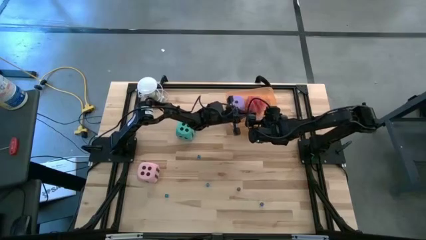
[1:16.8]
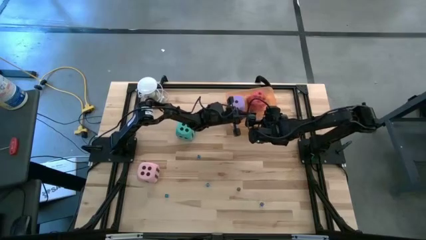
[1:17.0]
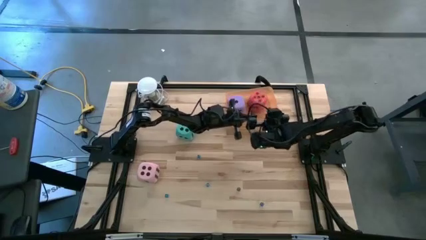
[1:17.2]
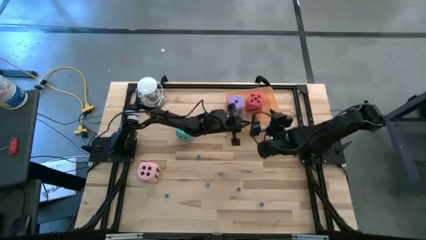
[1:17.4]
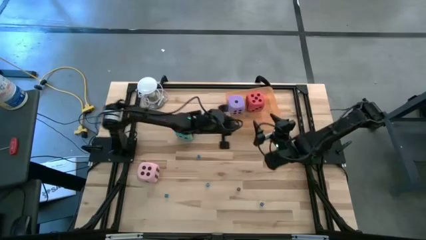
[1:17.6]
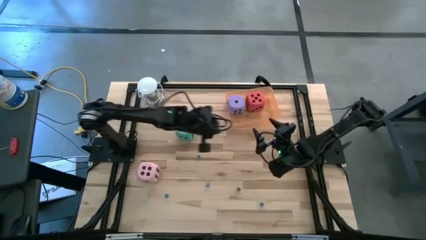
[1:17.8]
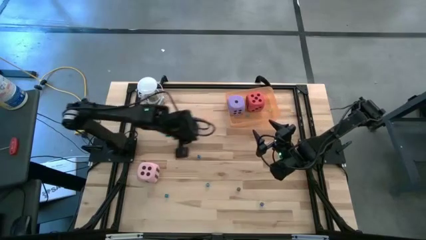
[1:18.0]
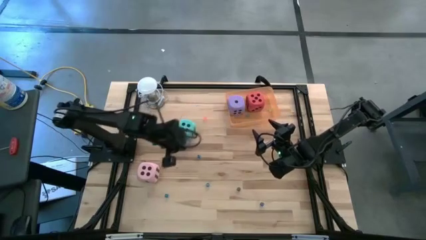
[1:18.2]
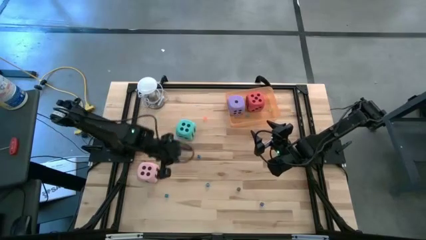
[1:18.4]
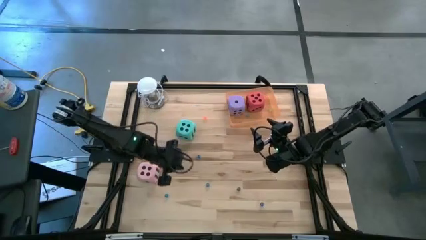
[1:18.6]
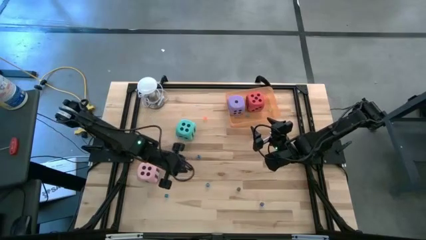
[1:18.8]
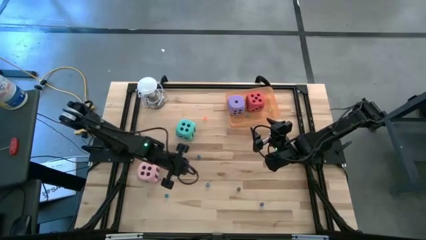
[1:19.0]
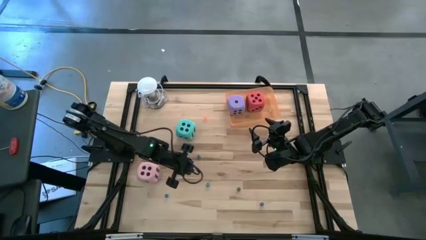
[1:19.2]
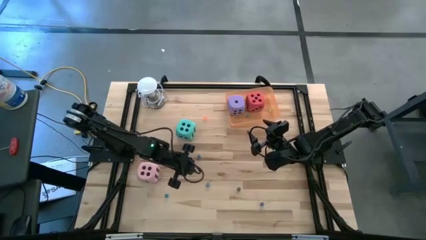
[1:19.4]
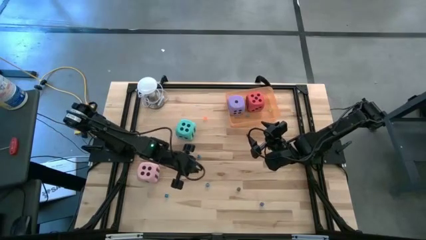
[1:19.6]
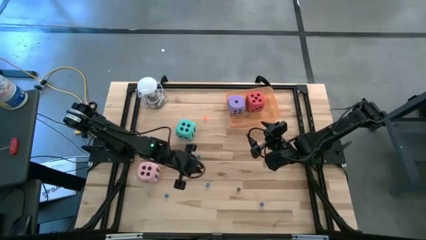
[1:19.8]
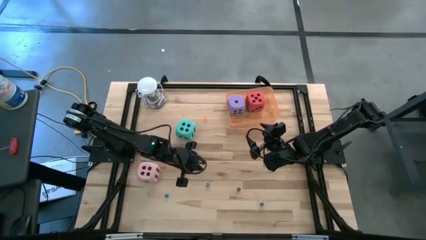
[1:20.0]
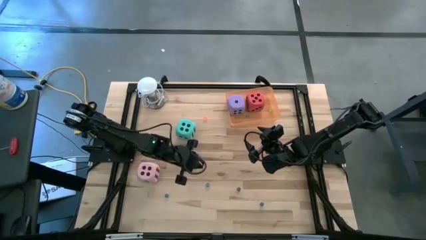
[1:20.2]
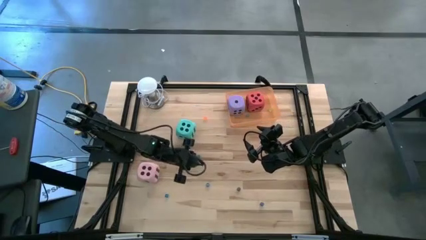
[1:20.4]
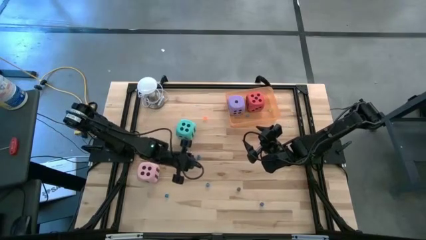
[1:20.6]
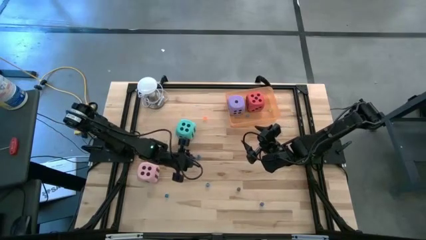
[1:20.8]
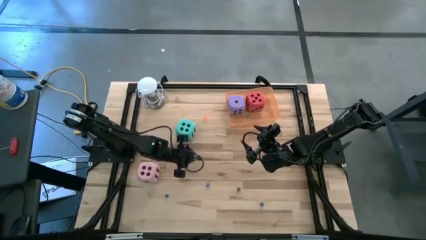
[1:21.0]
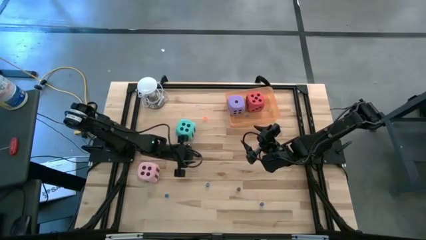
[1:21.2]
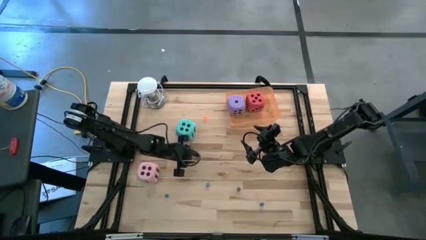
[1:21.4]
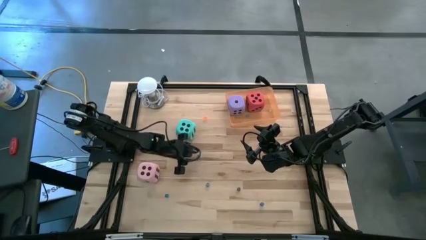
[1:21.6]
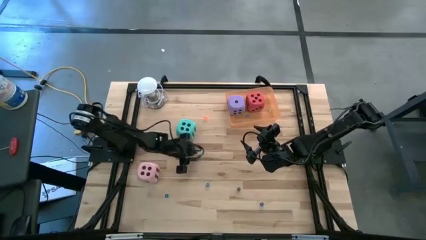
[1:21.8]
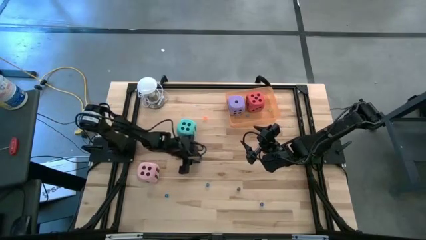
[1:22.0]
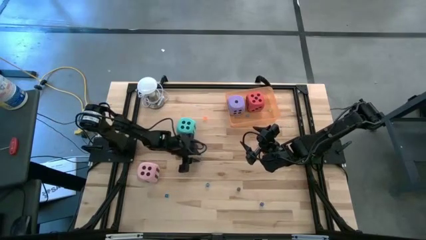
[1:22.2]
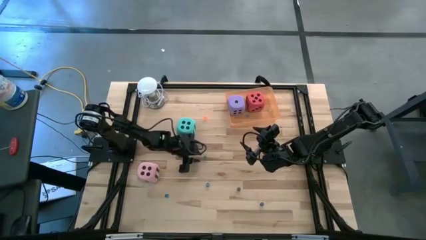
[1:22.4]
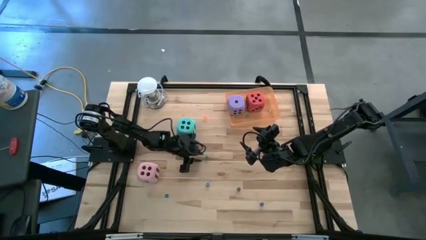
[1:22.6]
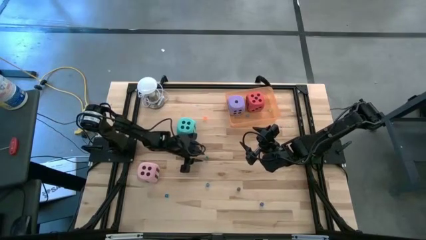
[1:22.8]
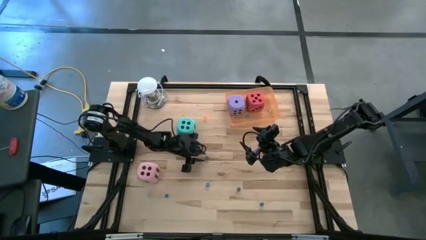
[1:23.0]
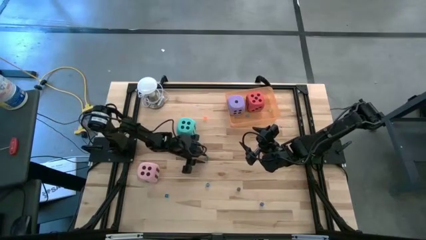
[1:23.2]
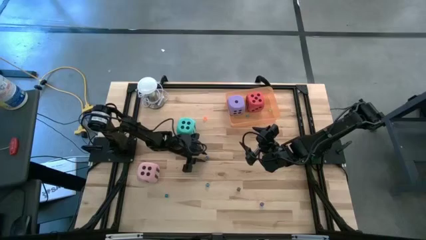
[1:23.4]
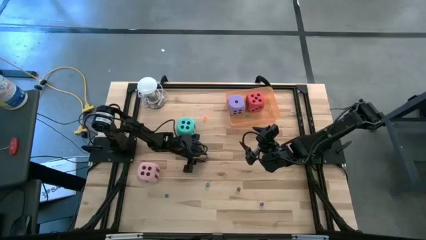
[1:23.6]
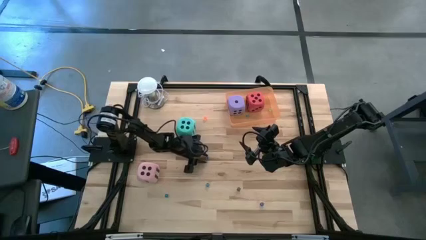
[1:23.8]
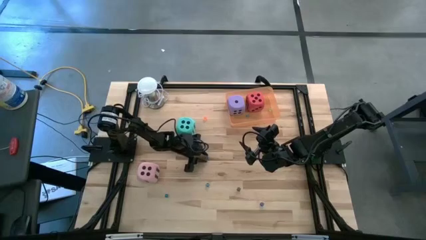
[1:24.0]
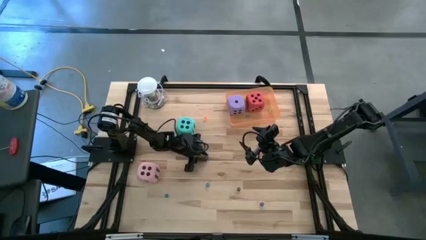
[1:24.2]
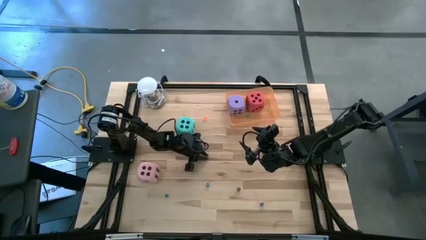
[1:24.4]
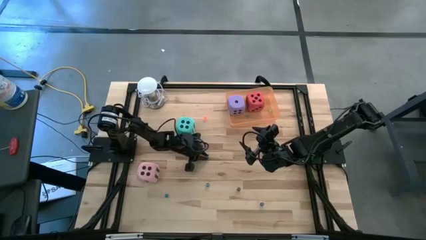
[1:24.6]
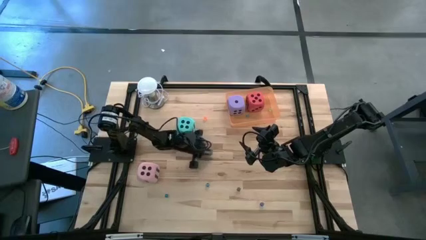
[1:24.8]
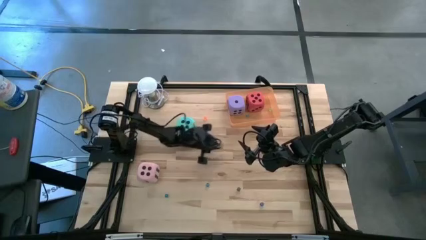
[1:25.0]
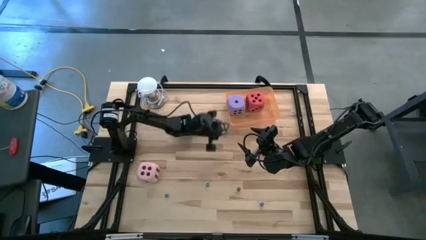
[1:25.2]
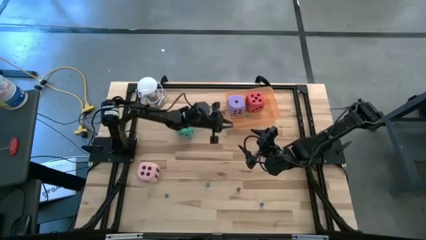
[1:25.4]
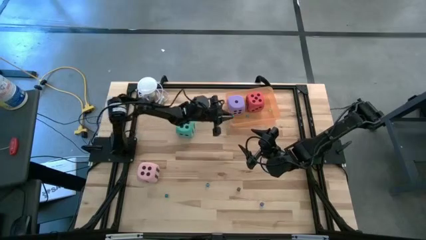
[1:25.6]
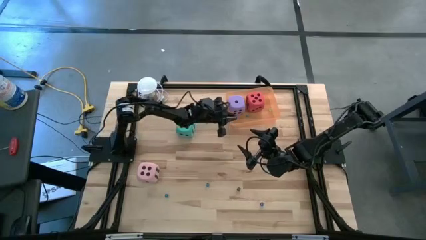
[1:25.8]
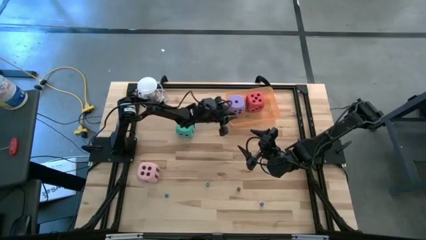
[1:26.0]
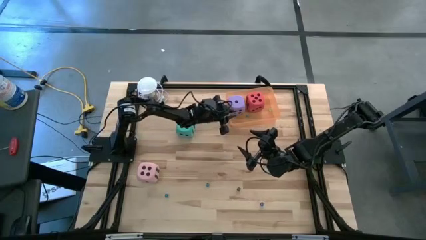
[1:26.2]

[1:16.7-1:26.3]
Task: Pick & Place Dice
Put the small light blue die into the the orange bin

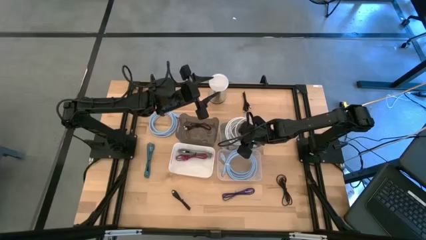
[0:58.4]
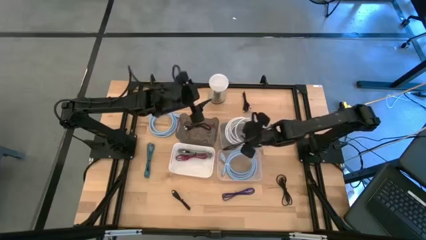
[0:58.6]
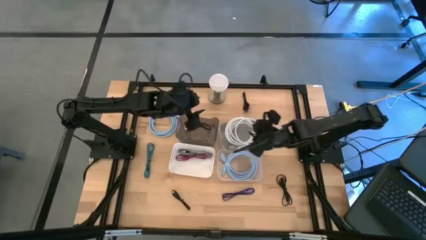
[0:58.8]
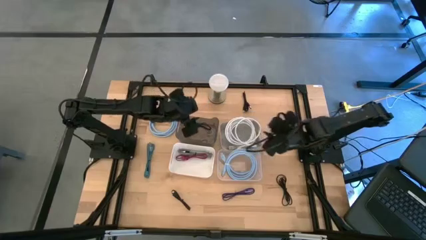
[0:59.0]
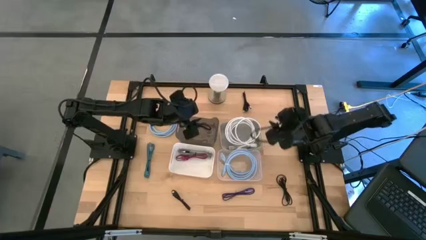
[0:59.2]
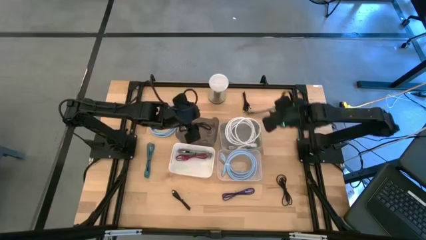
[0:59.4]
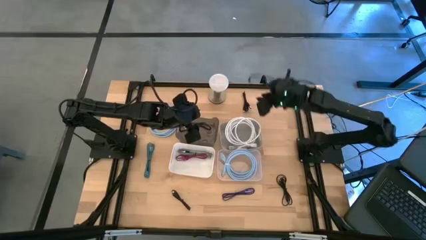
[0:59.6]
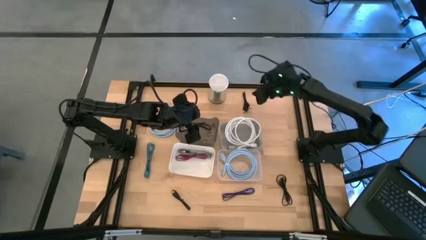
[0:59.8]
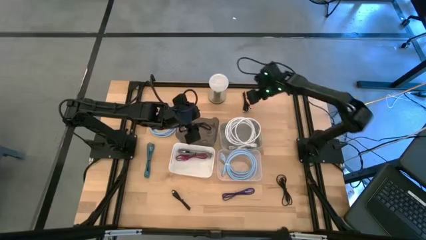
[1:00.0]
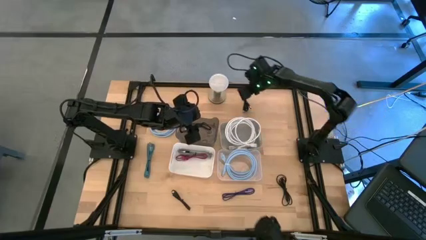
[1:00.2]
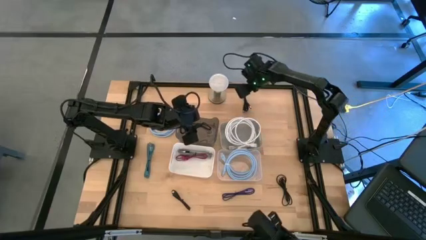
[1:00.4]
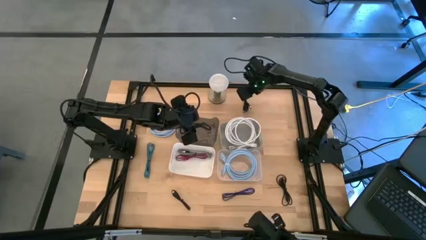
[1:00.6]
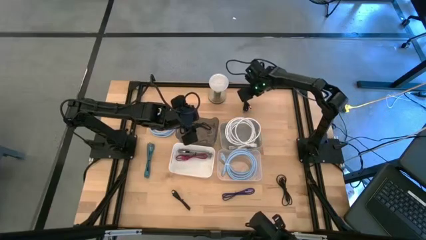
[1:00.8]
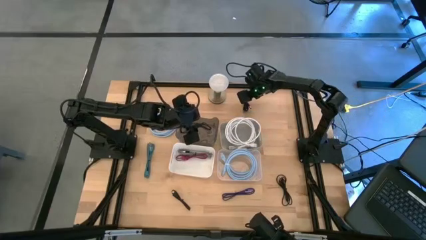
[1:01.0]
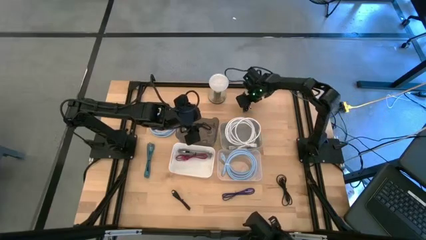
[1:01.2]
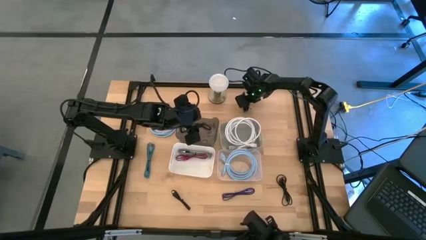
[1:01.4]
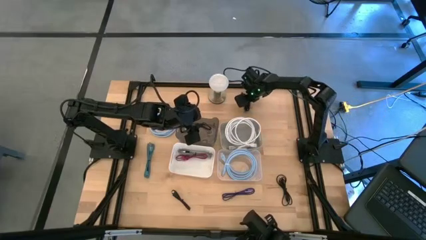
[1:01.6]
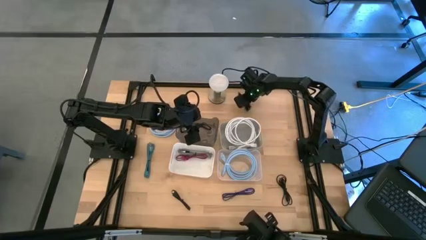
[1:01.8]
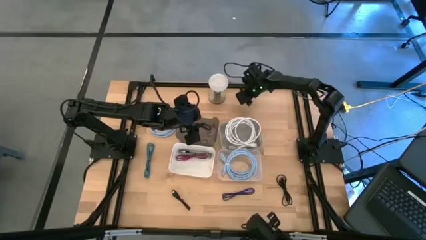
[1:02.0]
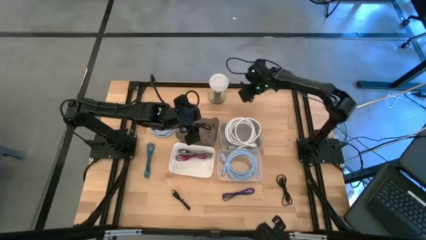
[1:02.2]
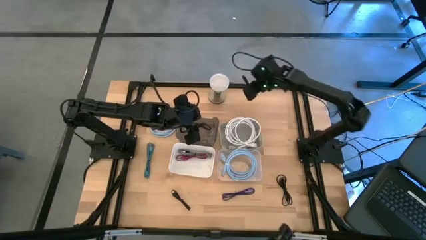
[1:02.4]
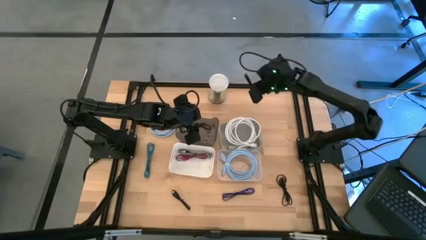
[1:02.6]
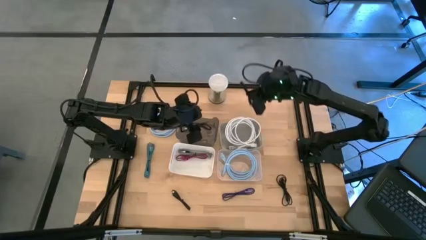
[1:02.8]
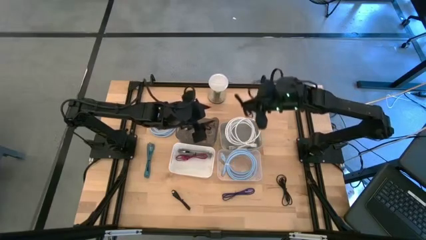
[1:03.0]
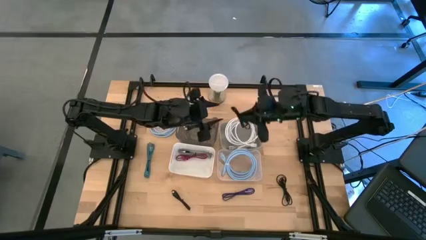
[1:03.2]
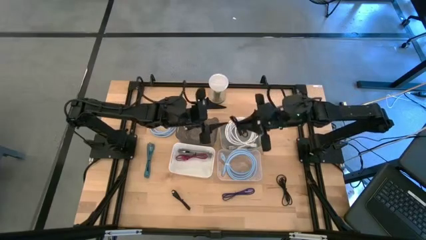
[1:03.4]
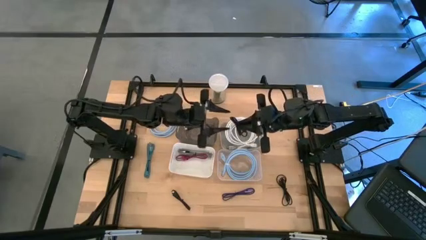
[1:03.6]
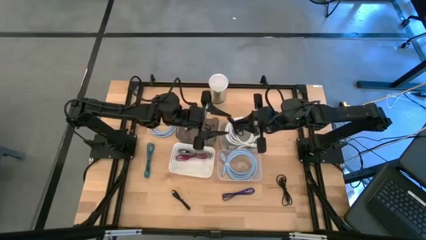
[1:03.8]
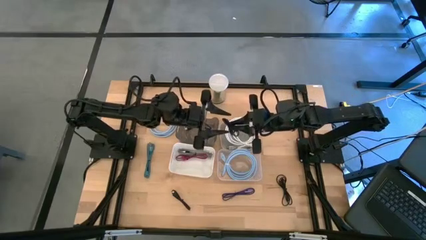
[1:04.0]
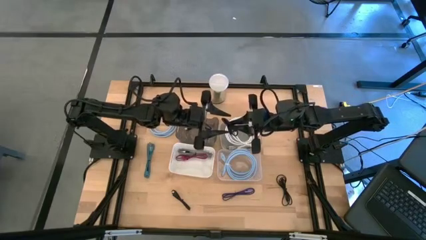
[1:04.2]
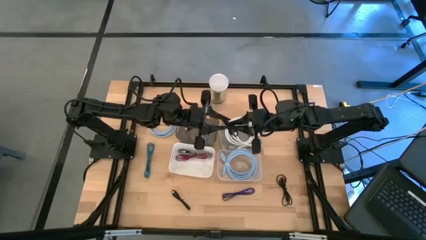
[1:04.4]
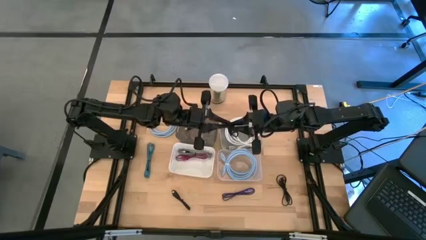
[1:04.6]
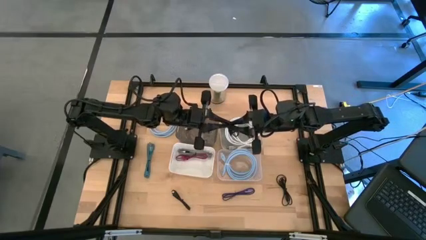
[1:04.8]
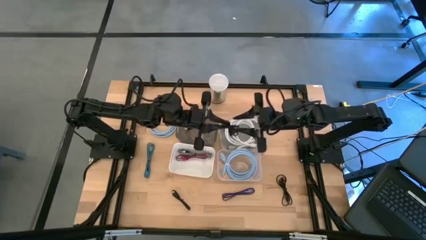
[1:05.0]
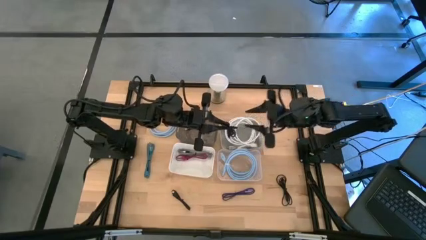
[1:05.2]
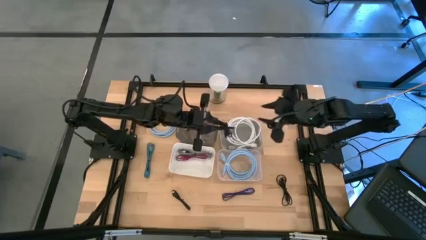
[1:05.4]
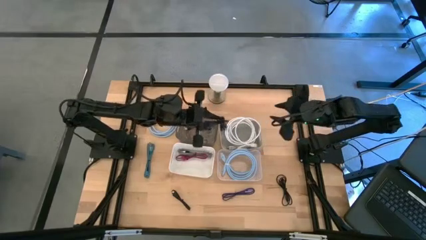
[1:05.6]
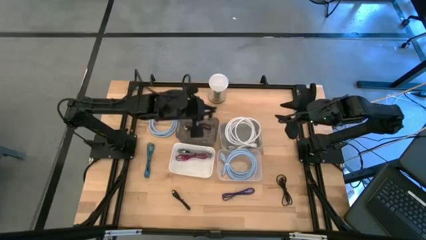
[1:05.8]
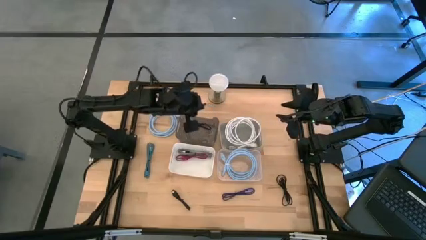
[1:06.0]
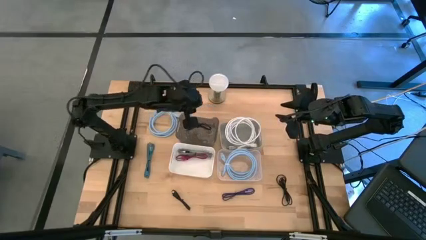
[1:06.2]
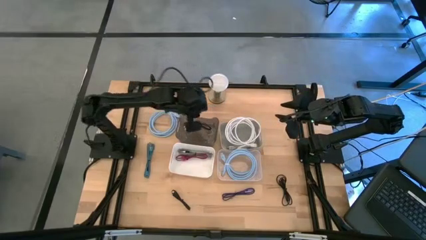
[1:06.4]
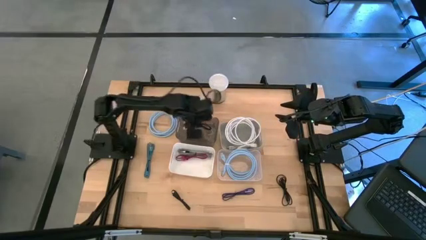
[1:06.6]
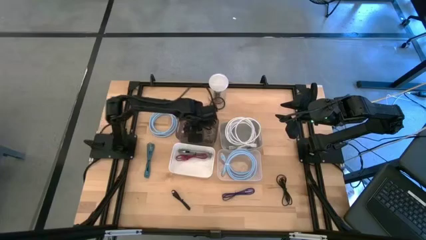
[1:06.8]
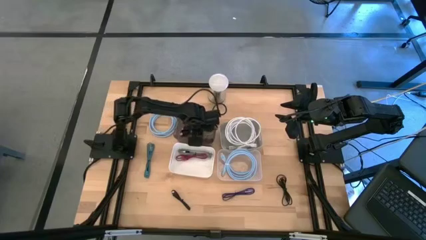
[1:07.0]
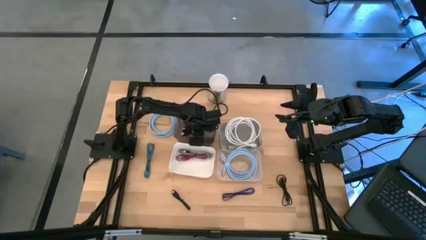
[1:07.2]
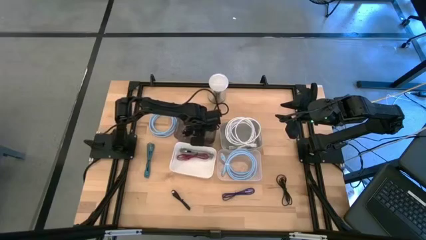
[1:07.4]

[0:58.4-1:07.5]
Task: Pick & Place USB Port
Put the top black charger cable into the black bin
